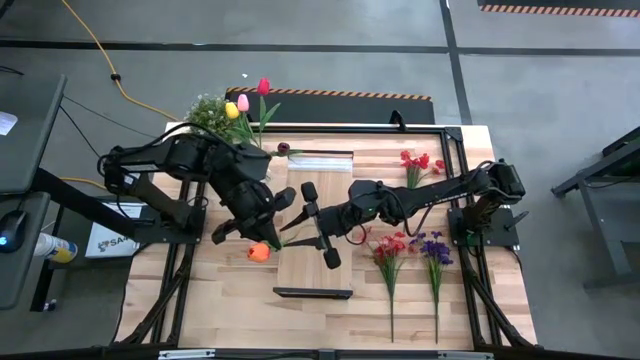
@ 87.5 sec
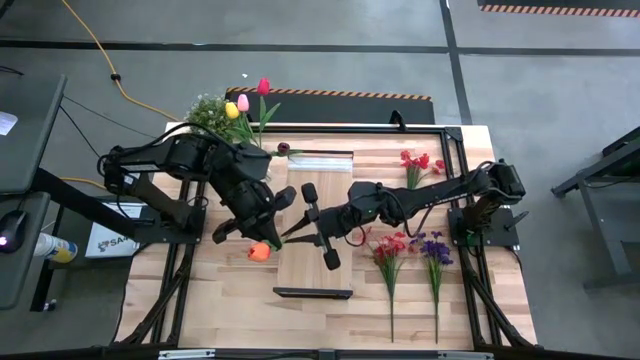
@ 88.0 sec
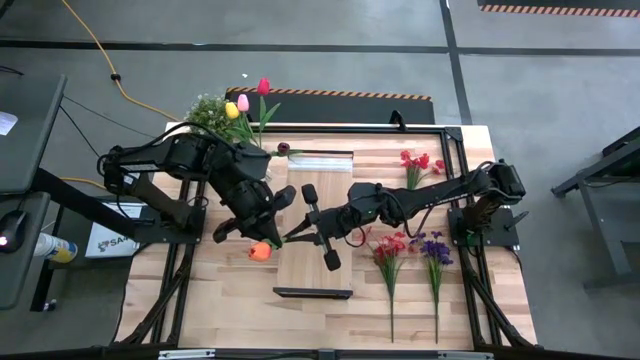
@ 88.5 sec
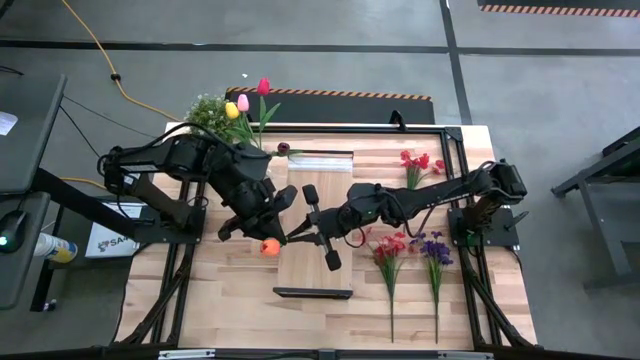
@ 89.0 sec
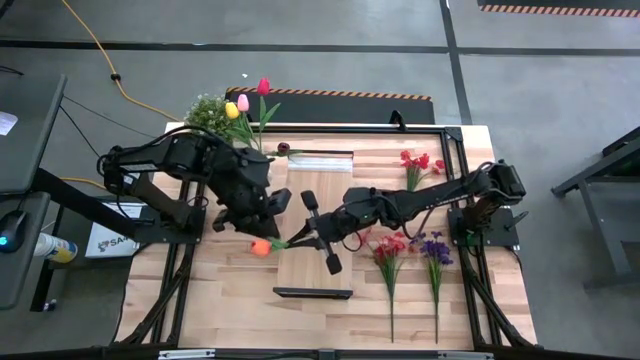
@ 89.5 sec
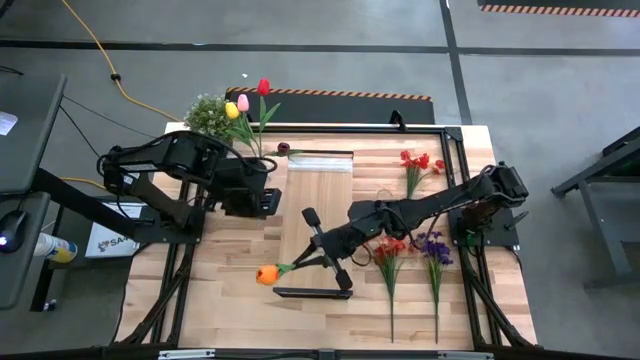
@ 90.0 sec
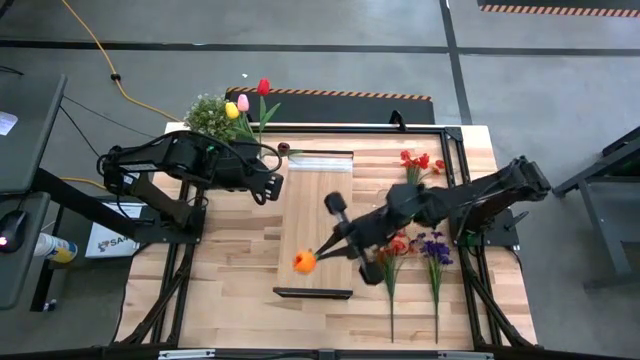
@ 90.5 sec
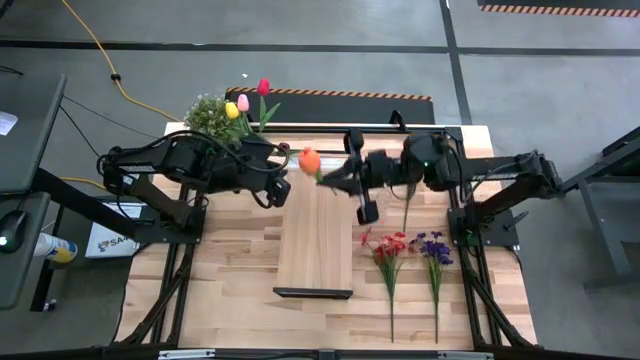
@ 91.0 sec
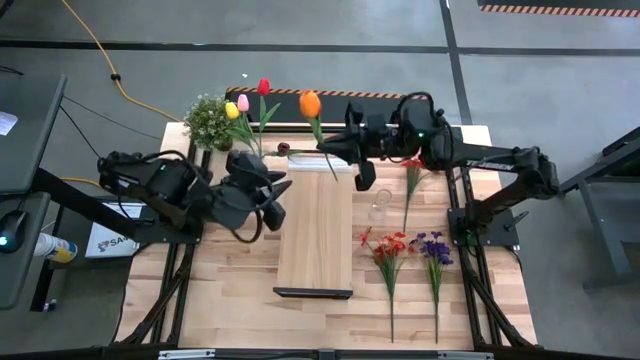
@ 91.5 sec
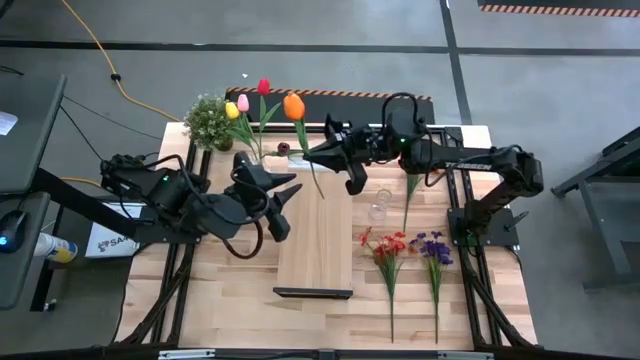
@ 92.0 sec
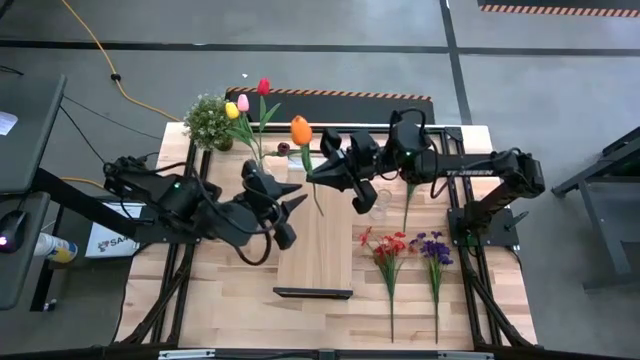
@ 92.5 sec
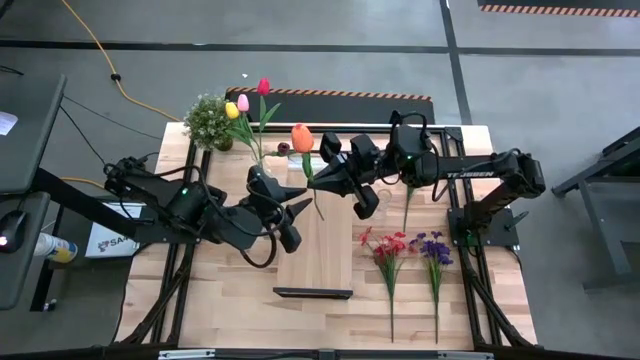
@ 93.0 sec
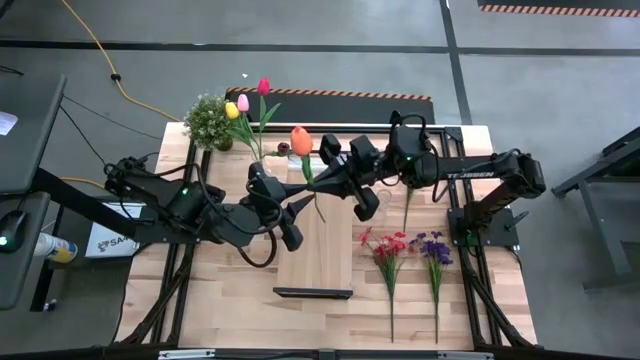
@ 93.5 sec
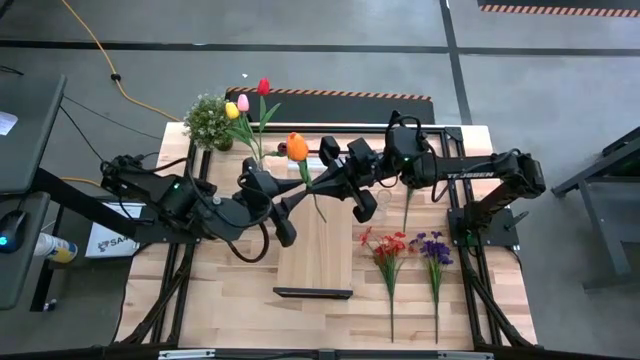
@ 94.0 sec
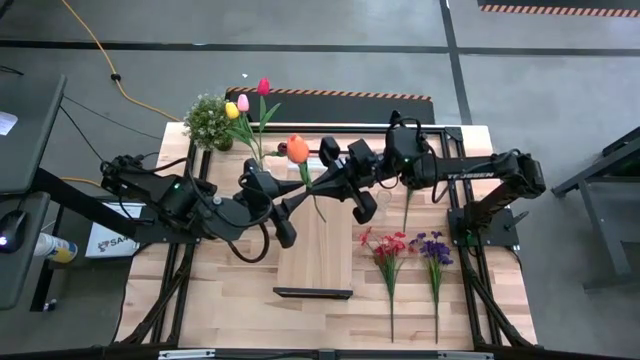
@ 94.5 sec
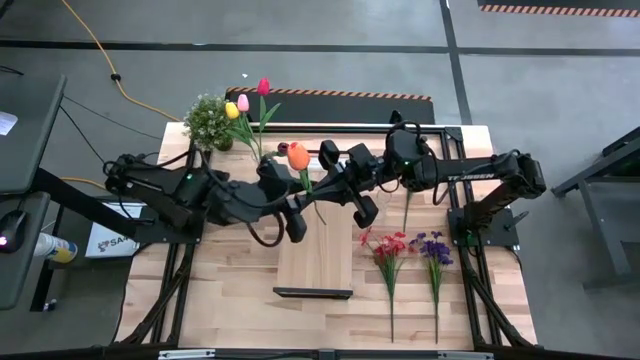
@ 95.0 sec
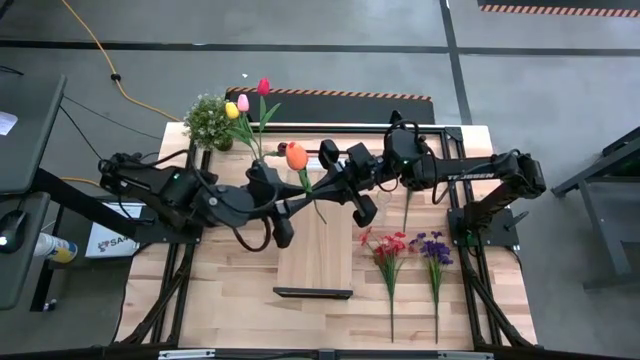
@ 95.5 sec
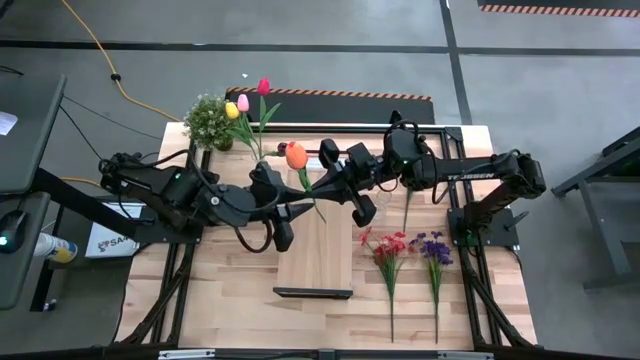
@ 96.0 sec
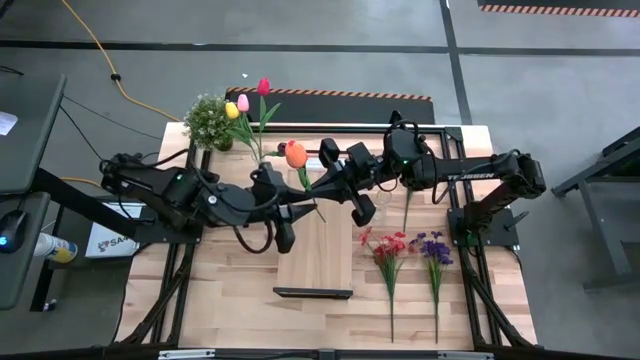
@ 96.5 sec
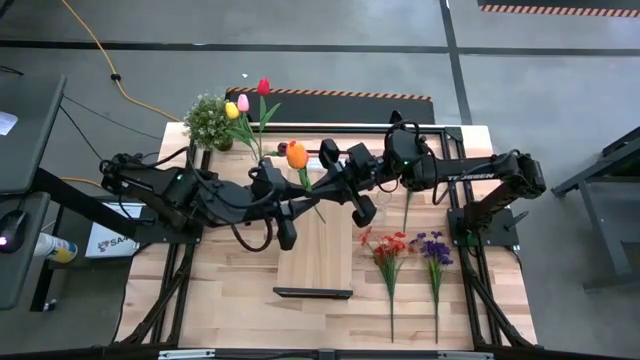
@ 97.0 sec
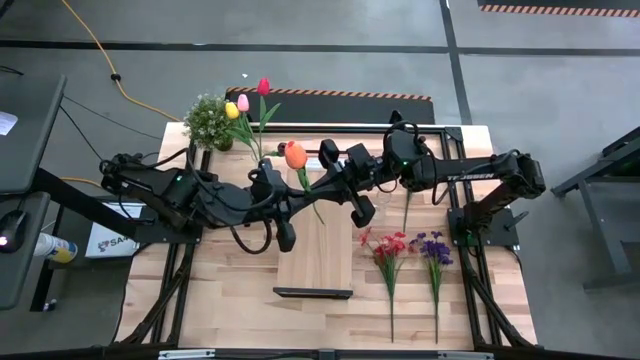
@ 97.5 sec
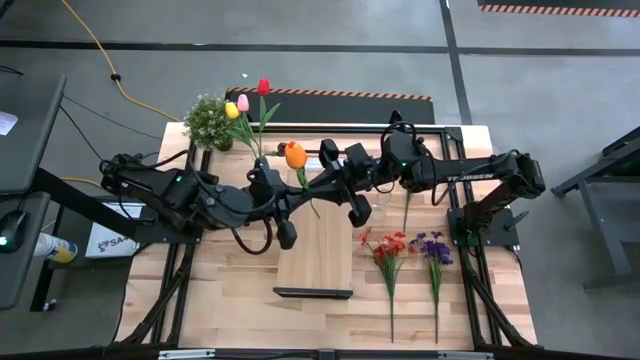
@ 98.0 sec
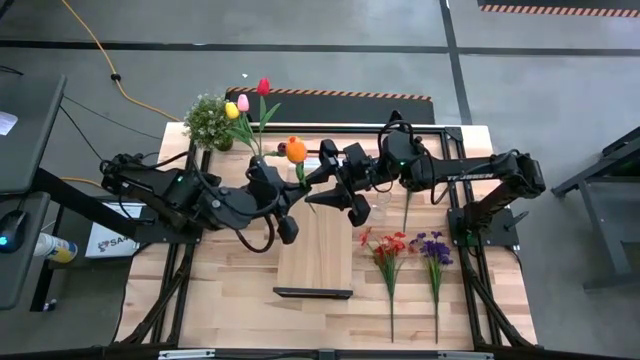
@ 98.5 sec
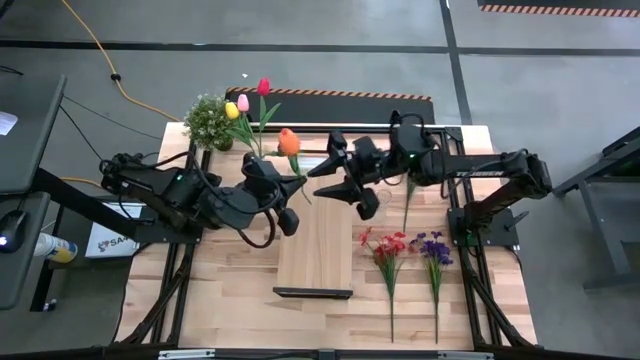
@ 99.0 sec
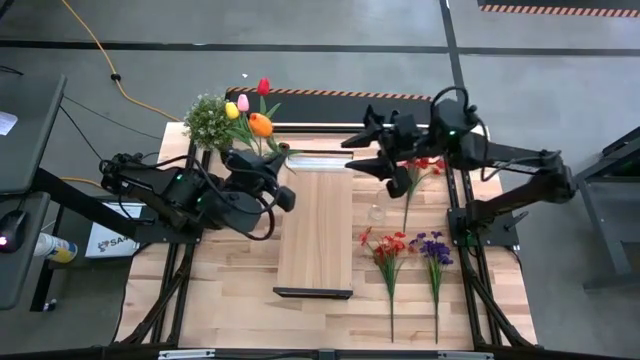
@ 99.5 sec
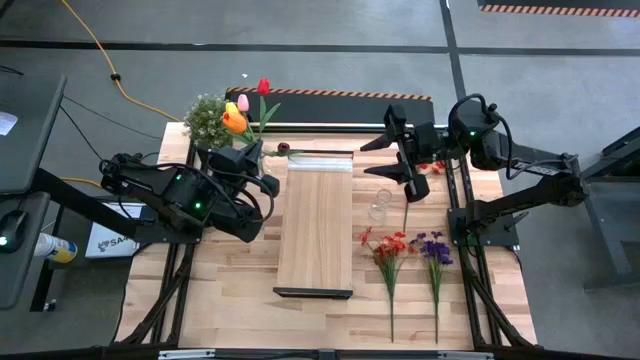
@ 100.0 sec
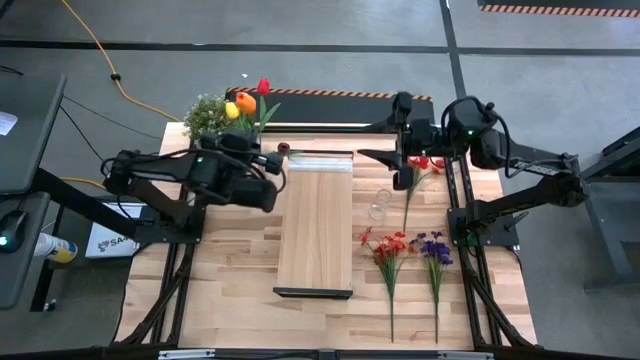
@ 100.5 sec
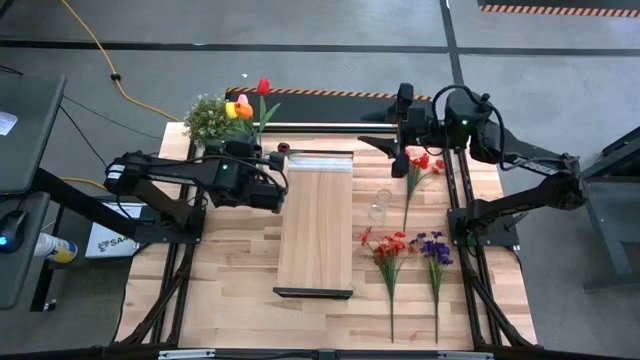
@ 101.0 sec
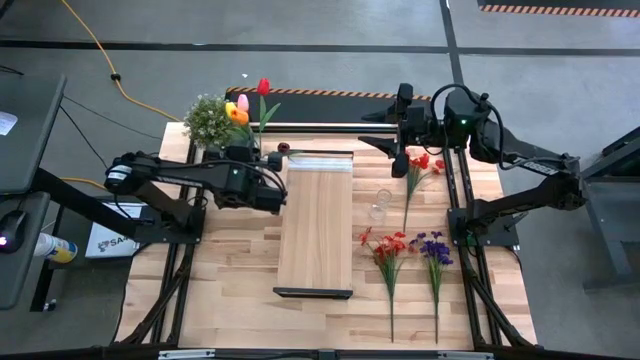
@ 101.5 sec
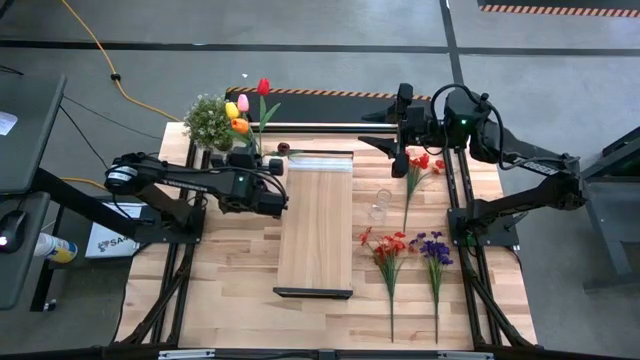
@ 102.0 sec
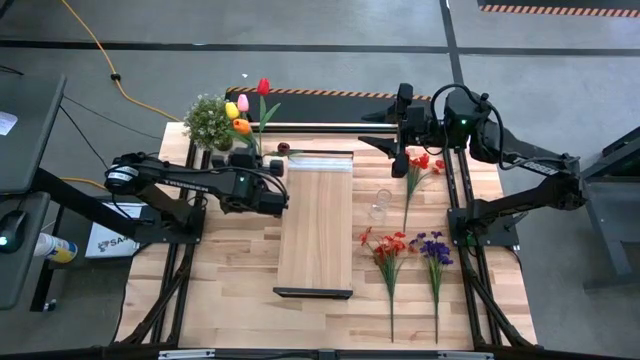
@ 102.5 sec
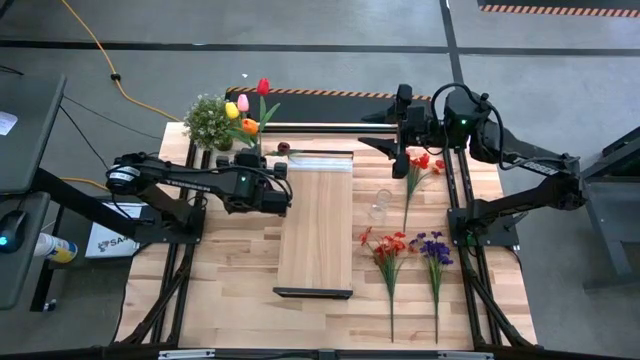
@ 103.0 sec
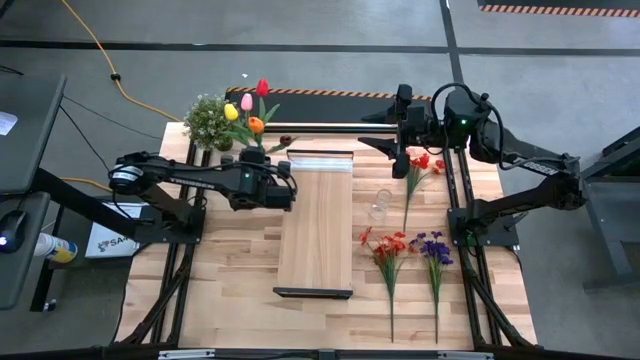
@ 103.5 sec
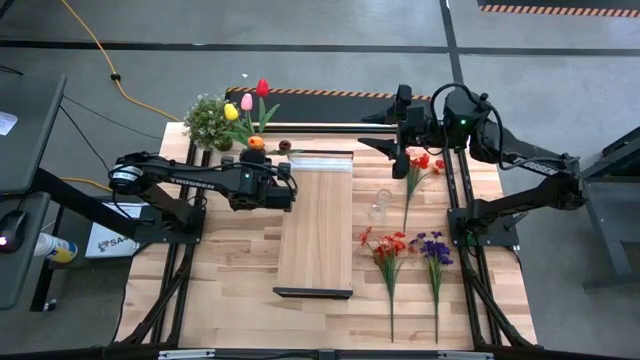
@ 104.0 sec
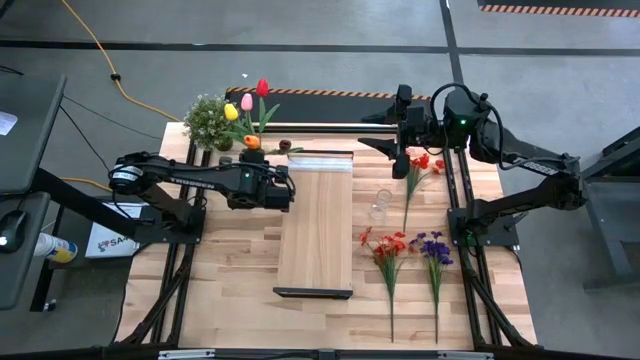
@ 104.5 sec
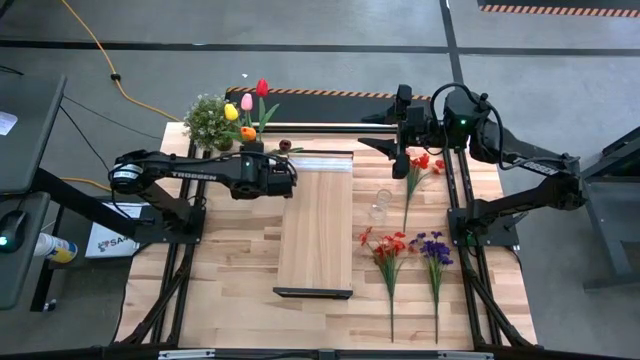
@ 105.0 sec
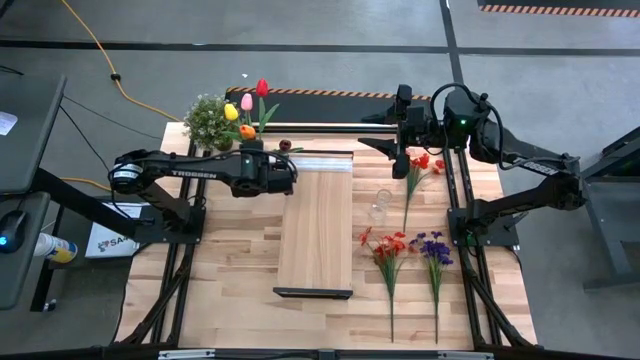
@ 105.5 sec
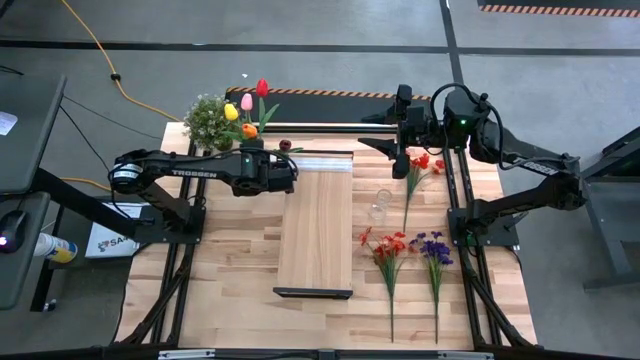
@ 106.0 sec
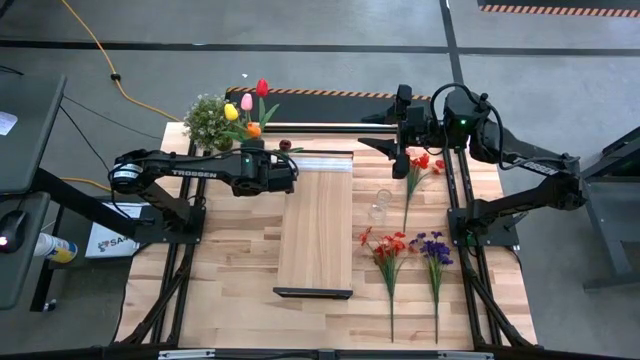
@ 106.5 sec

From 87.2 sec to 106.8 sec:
Task: Pick and place flowers into a vace then onto a shelf
Put the orange flower into the left vase

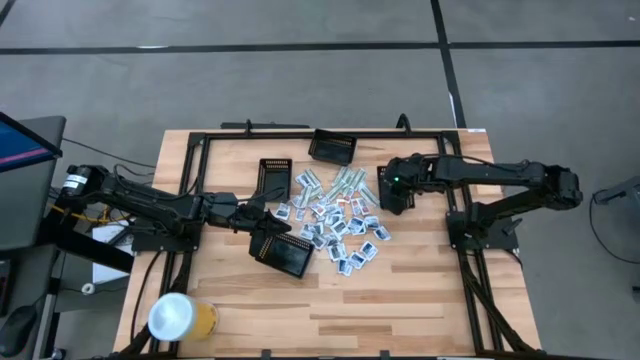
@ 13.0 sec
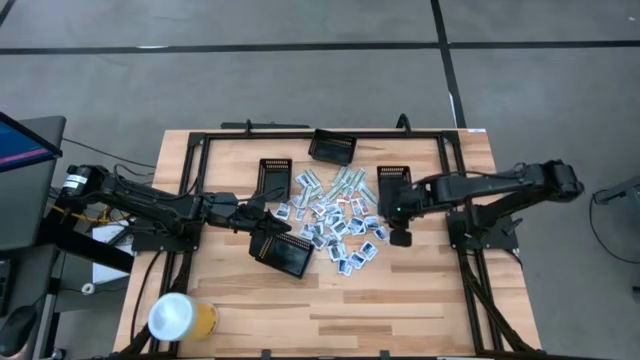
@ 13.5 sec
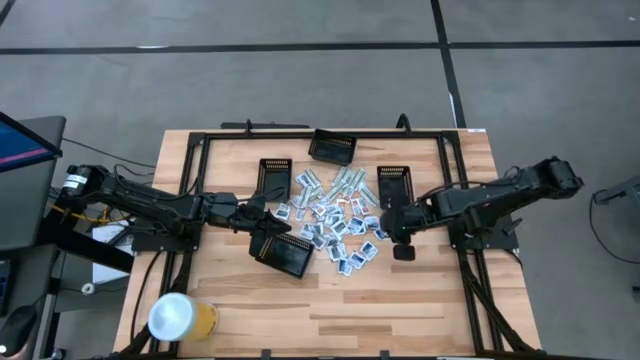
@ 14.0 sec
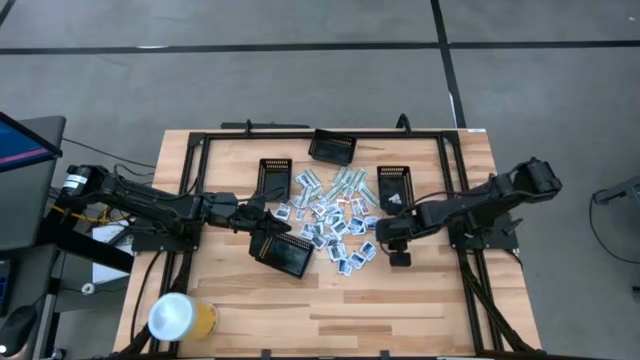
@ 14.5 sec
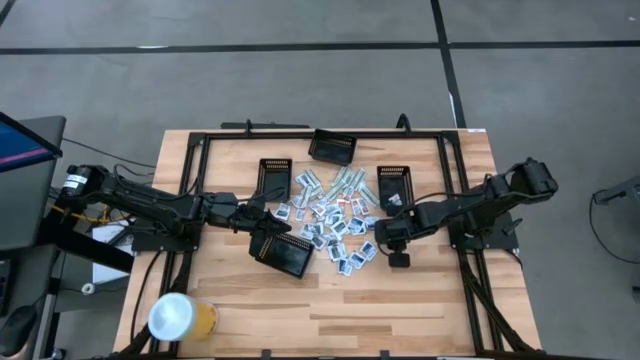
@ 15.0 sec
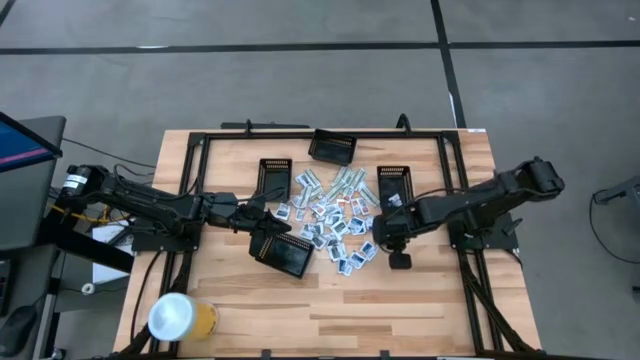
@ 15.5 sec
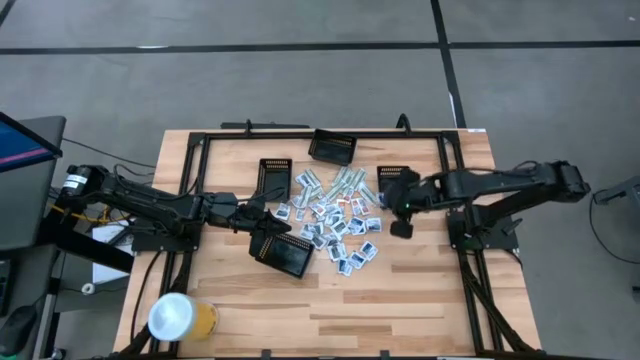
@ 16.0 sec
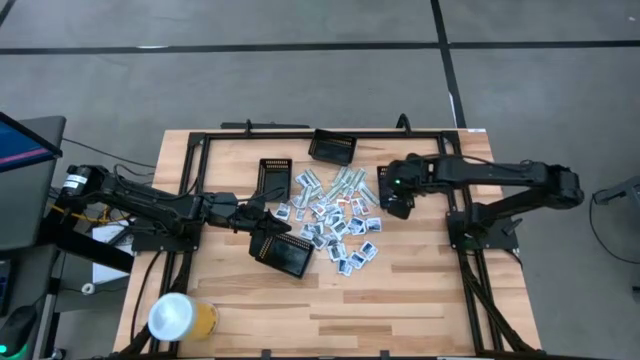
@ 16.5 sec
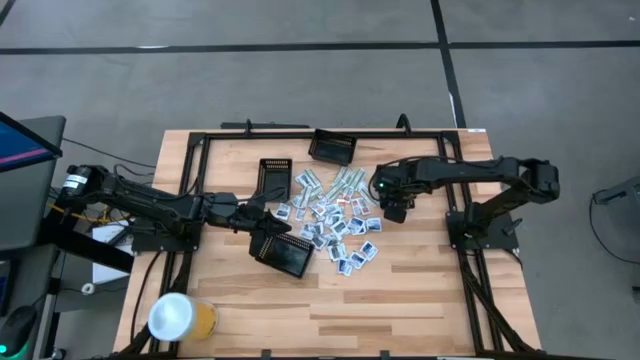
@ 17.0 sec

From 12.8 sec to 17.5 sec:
Task: Pick & Place First Aid Supplies
Put the white alcohol pad into the right black bin
